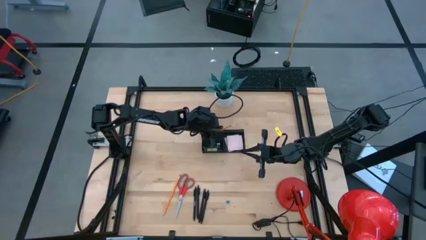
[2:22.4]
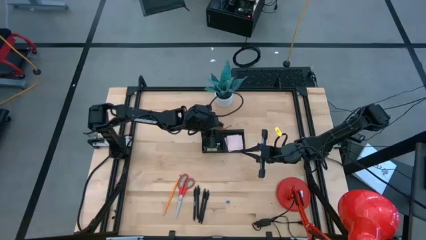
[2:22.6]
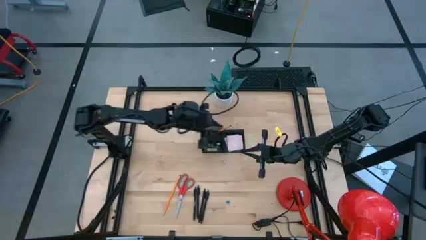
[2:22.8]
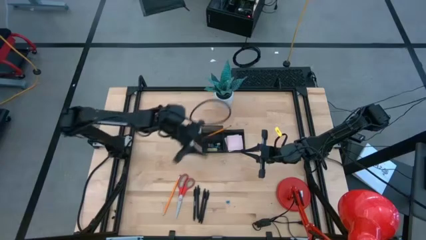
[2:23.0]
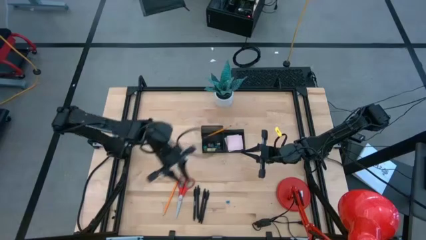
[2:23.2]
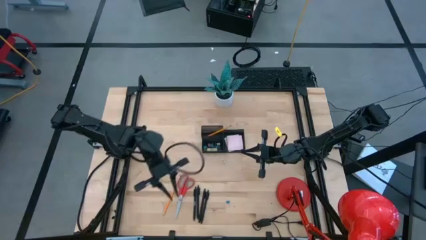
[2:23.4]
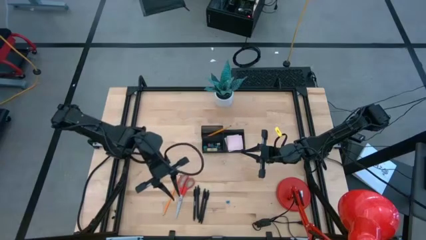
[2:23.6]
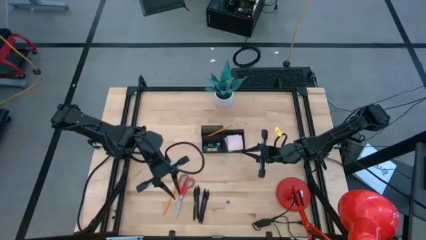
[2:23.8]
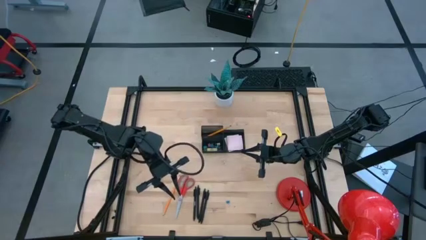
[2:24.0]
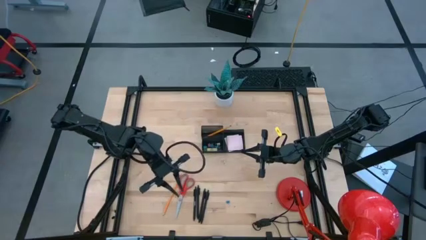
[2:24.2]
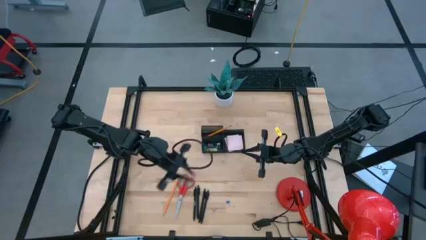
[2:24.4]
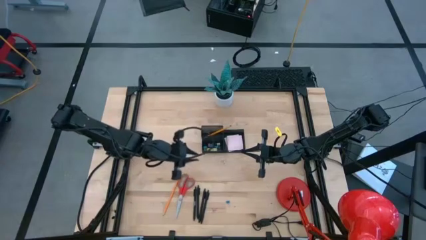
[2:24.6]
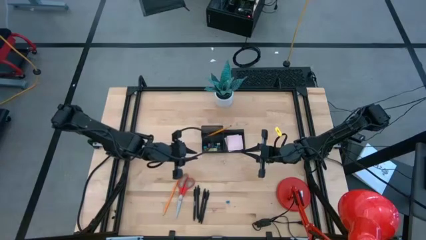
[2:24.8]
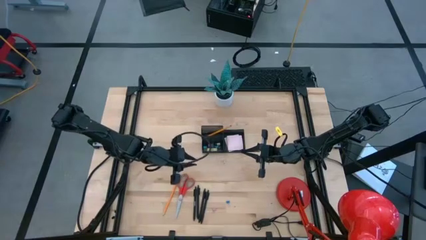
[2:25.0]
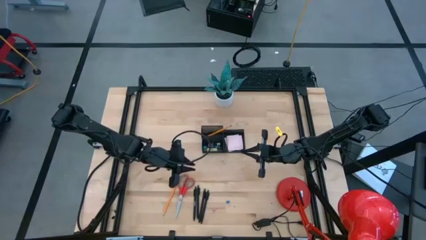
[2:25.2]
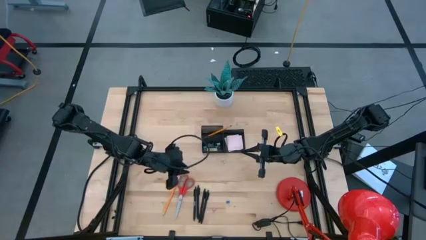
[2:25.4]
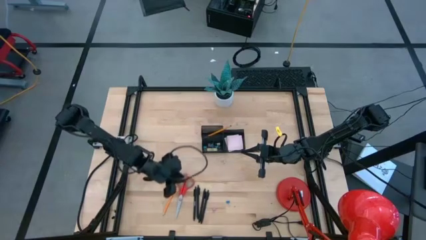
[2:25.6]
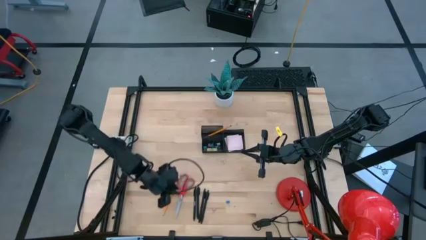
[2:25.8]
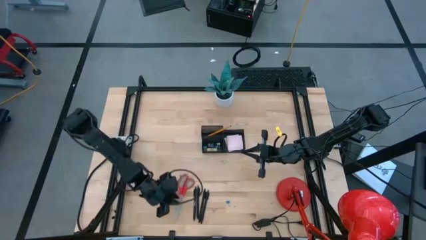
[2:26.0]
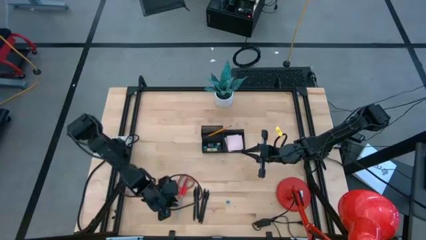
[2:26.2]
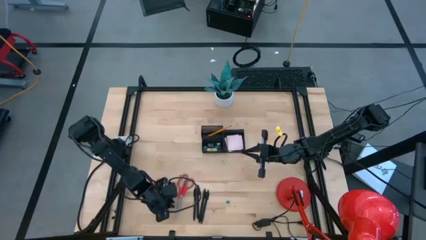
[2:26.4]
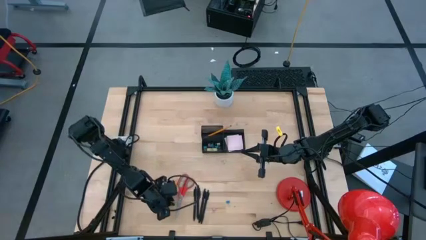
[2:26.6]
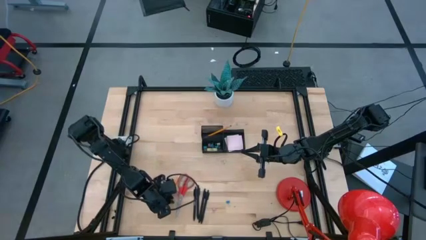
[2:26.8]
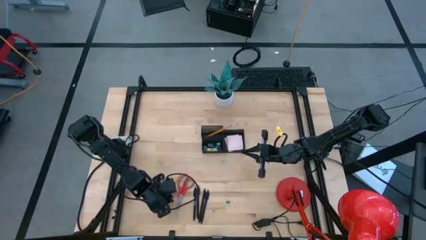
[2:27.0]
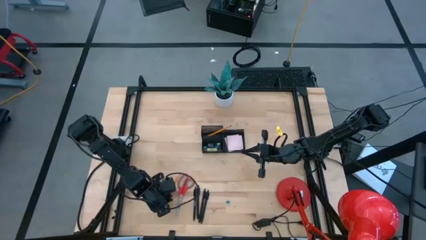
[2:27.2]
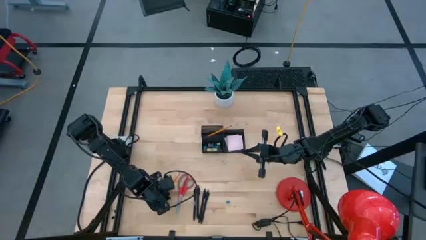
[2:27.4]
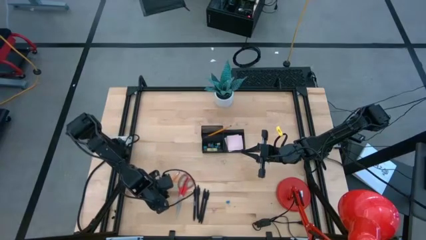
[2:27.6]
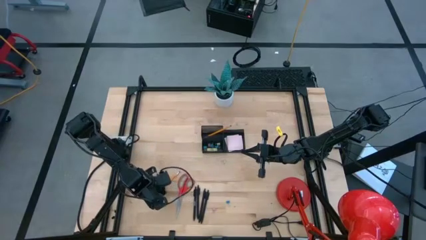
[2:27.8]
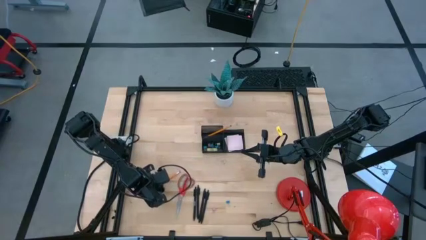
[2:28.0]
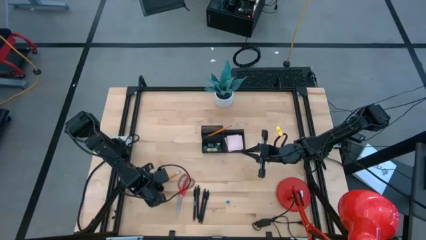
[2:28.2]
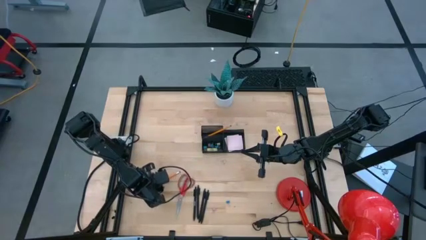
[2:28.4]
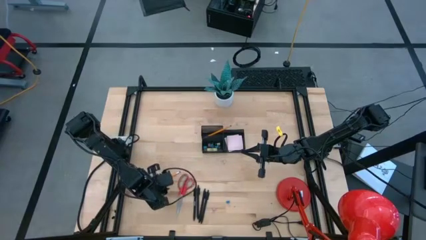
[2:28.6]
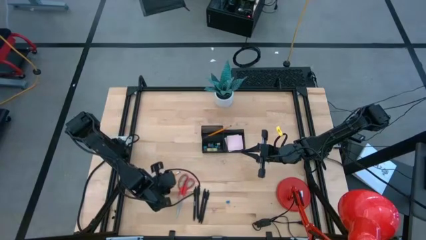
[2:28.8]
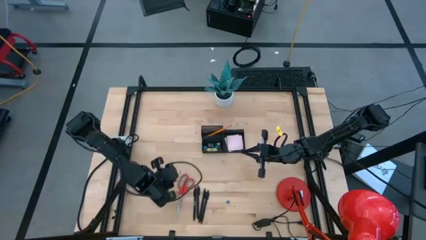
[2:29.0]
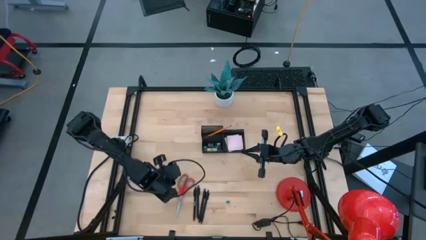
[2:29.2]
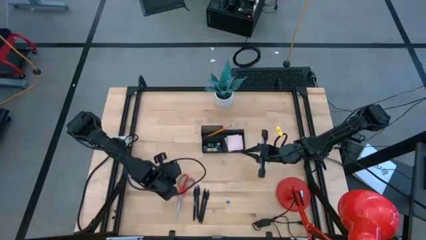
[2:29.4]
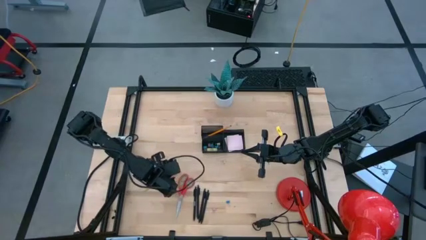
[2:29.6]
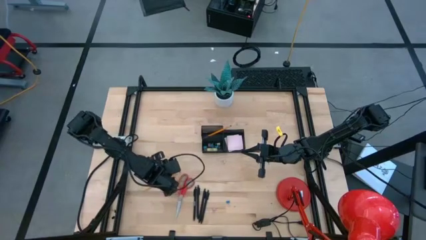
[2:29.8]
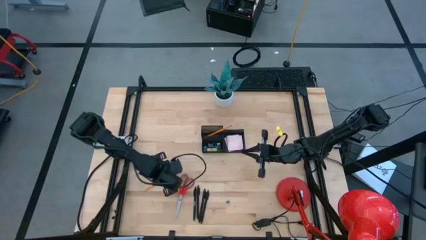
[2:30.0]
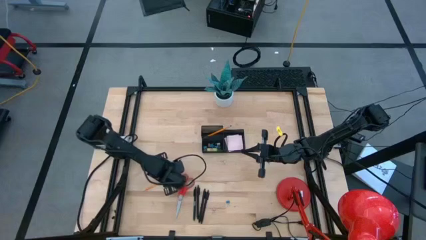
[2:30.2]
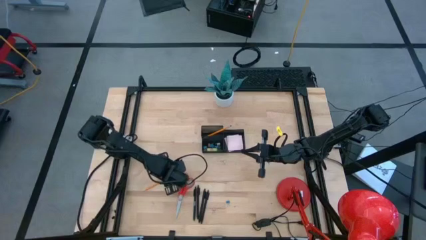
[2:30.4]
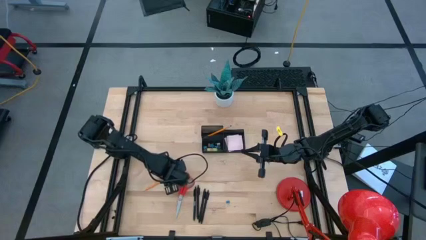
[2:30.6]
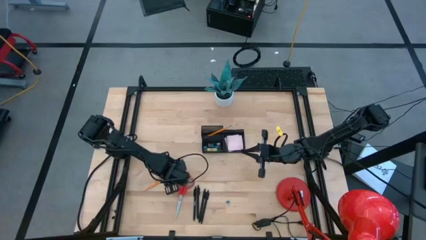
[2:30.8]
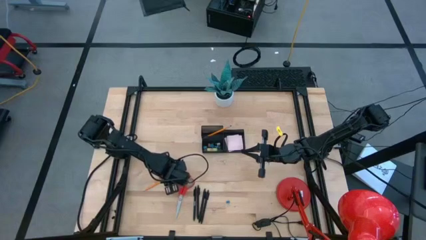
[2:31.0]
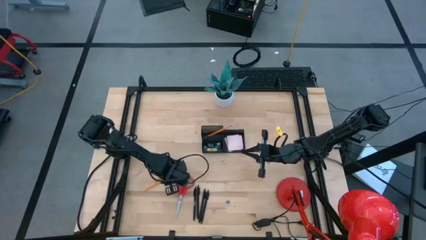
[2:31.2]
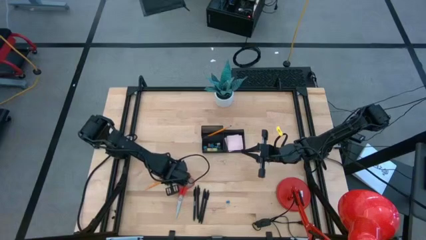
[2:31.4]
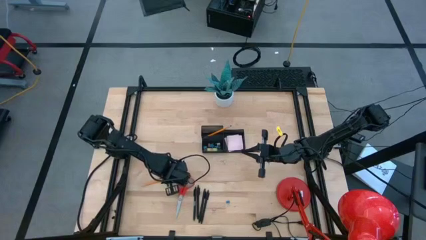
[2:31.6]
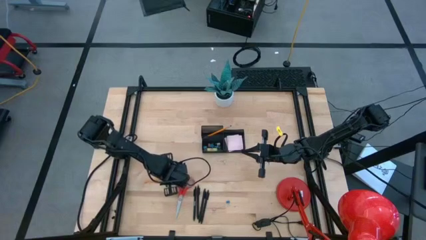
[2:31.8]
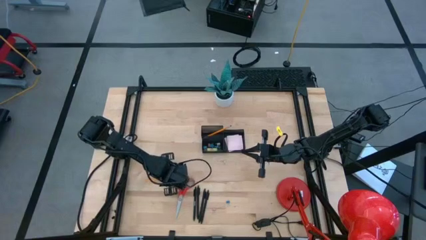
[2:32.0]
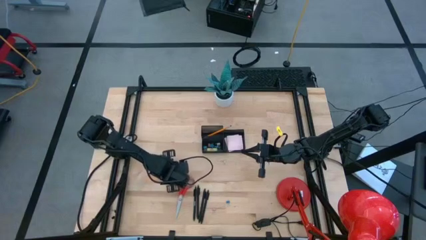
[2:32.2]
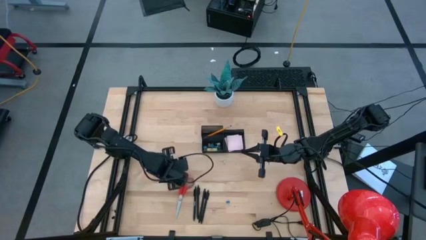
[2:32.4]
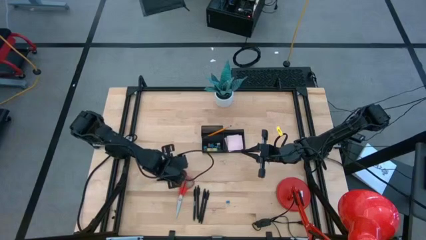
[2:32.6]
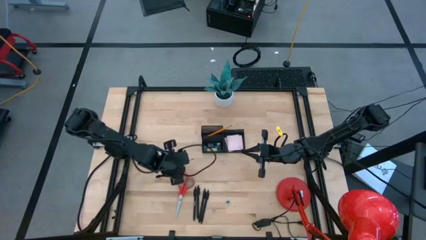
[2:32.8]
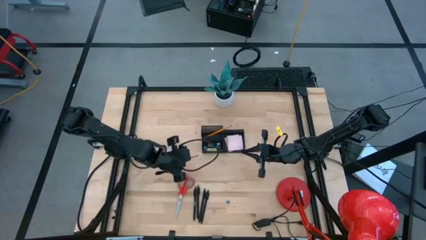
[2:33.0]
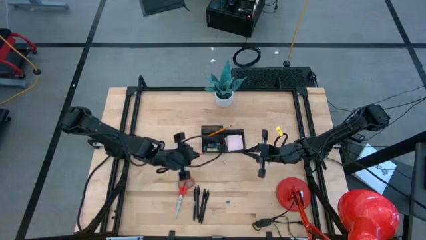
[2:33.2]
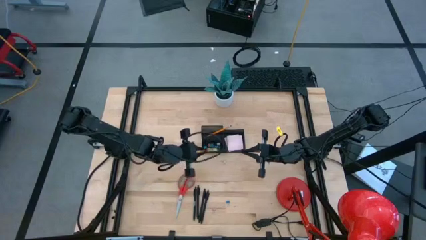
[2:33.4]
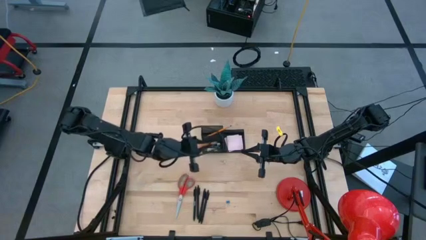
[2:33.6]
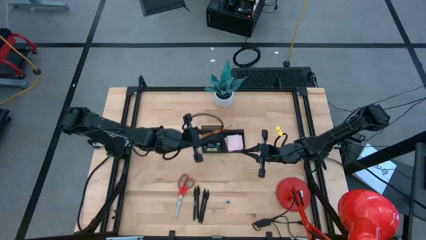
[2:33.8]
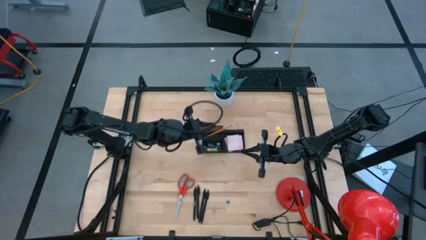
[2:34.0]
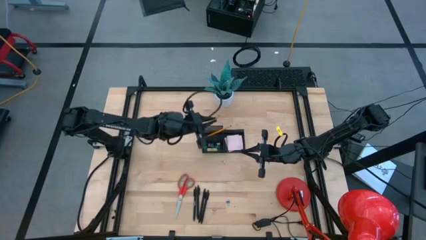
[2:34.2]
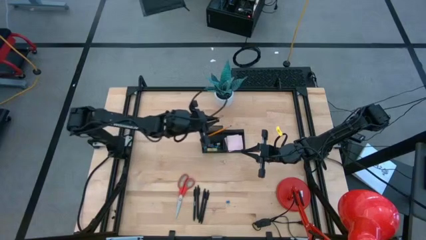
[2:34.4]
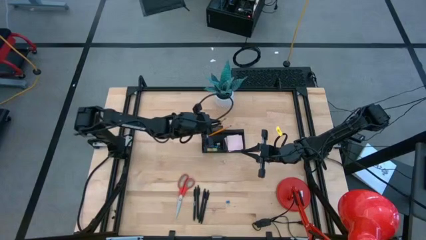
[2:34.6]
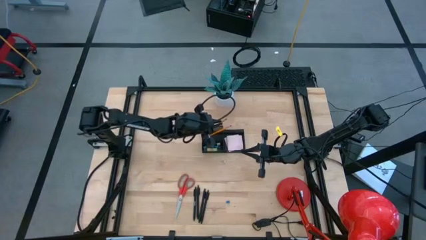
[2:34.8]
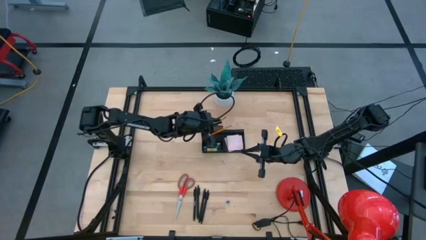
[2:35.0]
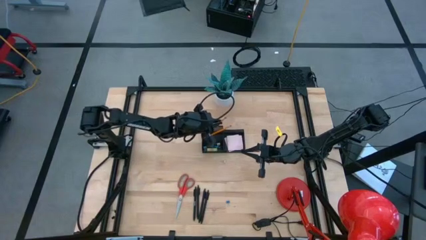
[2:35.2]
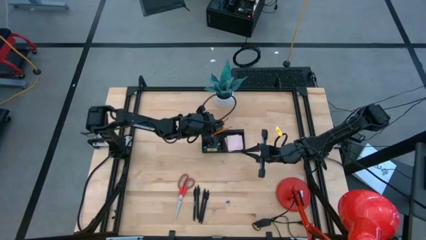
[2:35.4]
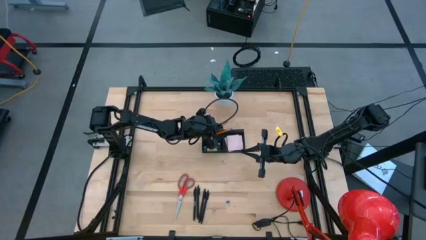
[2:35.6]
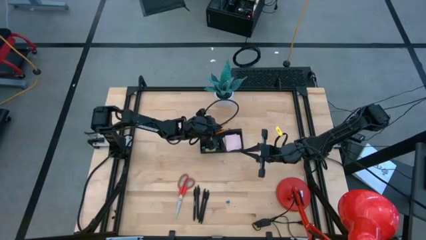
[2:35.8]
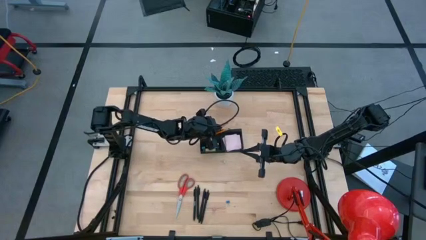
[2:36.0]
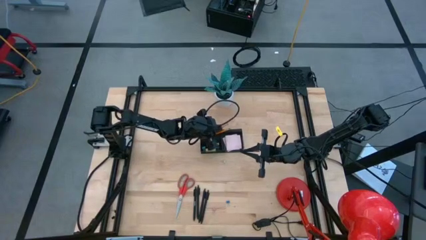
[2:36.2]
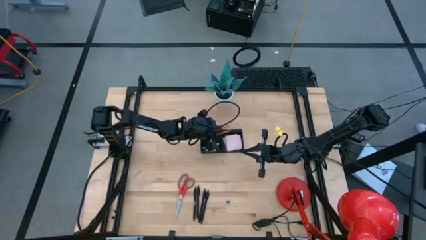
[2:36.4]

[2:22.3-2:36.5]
Task: Pick and place office supplies into organizer
Put the orange pencil into the black desk organizer

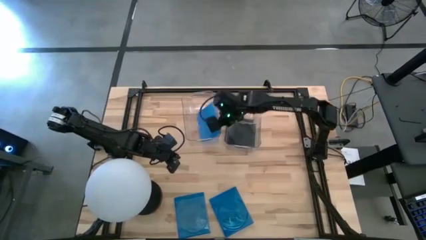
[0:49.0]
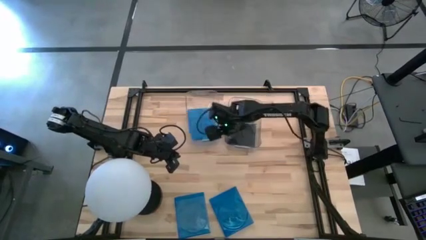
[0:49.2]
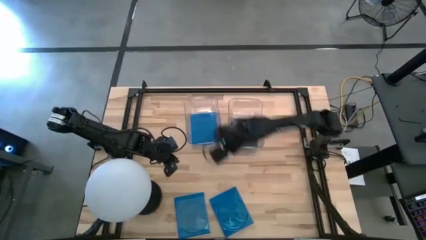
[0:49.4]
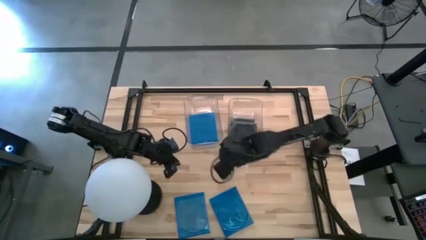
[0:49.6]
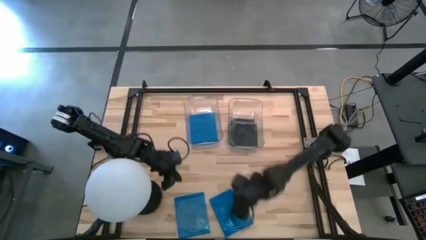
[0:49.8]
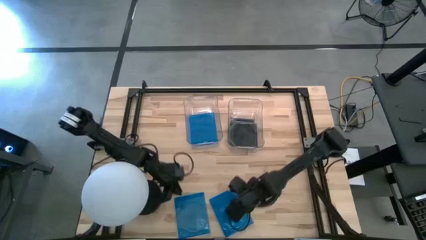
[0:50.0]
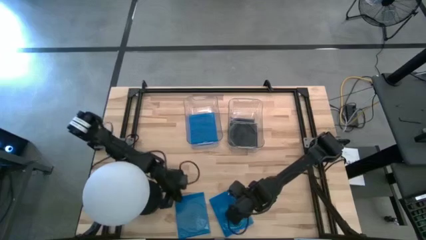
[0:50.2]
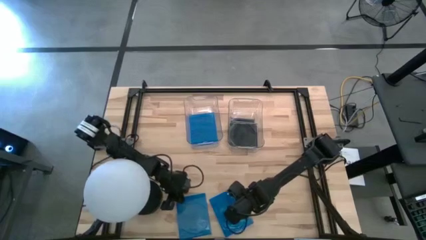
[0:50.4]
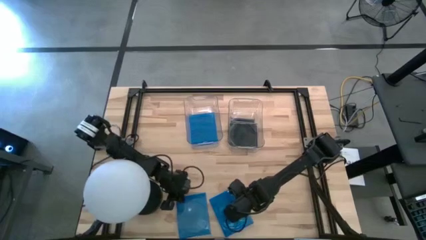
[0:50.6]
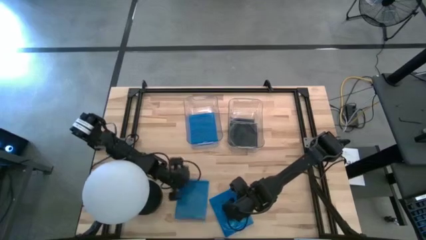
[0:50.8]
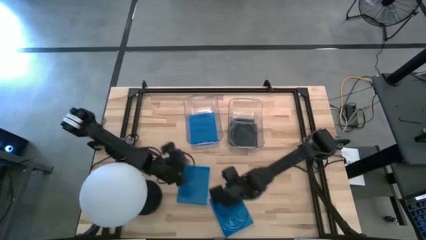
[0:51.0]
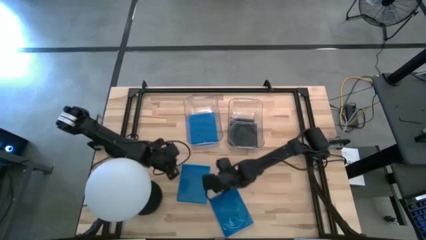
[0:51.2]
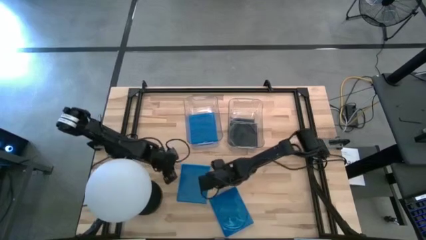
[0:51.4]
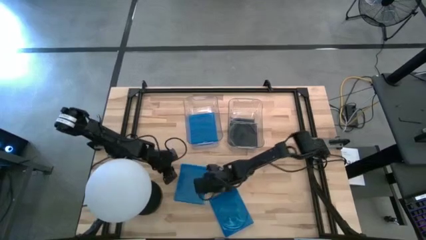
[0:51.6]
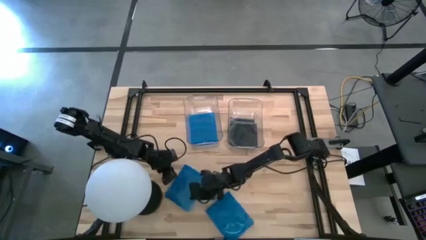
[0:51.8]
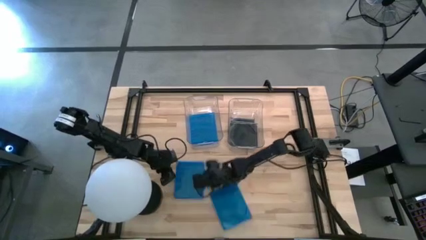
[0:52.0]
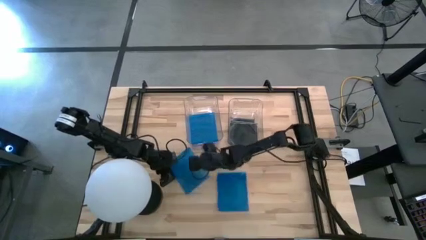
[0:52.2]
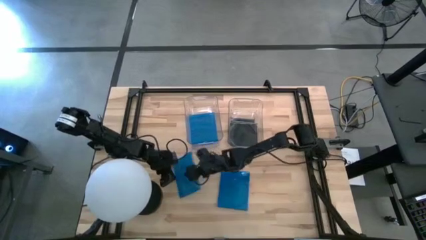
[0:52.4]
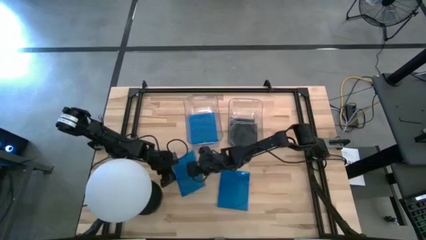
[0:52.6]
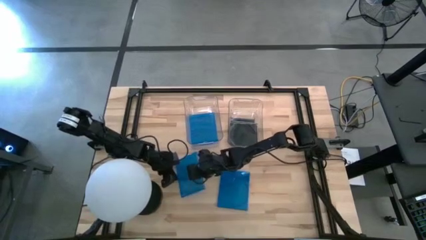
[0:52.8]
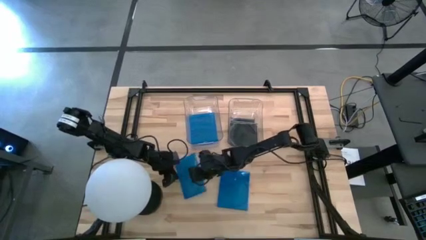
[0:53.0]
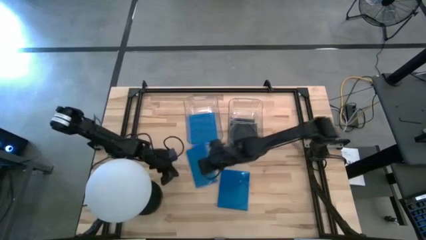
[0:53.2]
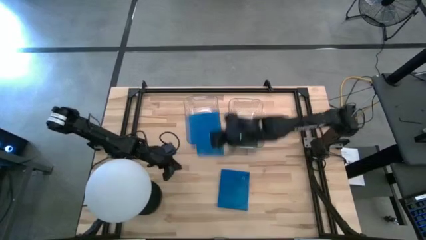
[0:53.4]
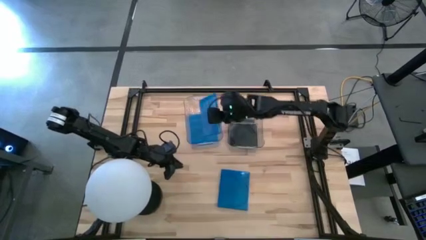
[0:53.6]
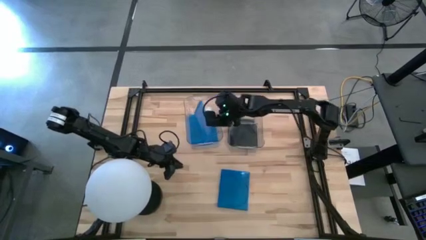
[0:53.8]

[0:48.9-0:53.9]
Task: Pick & place jewel cases by type
Put the blue CD case into the left transparent bin
